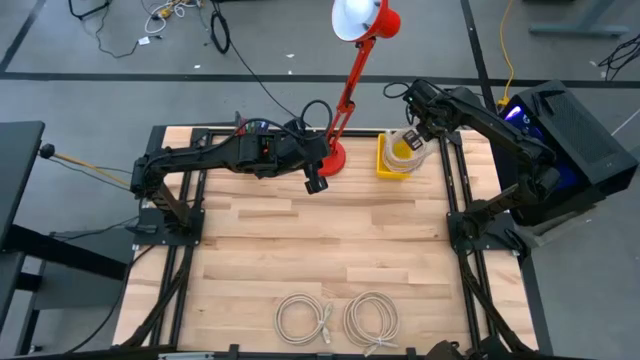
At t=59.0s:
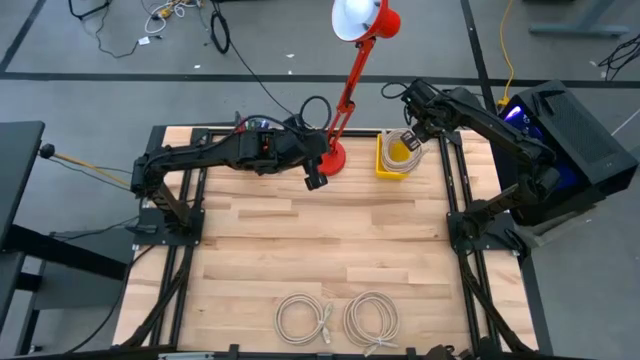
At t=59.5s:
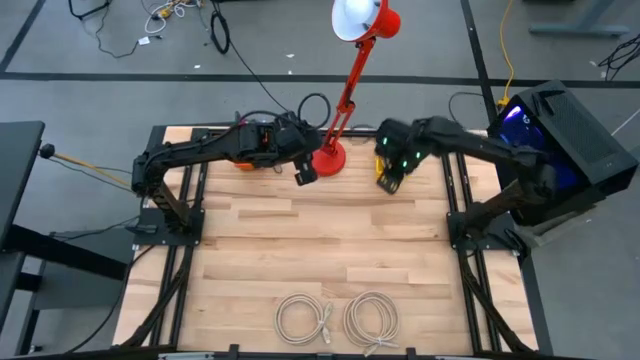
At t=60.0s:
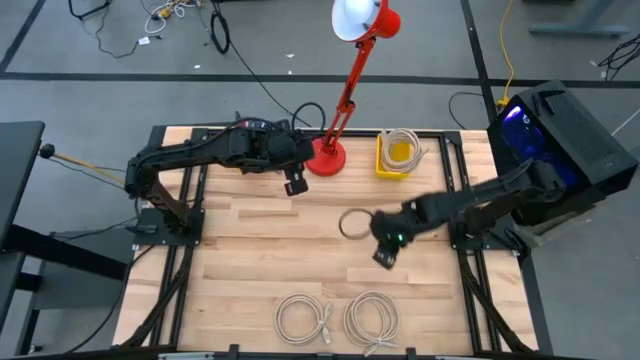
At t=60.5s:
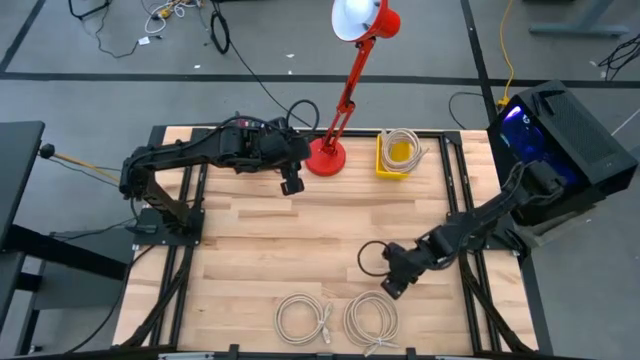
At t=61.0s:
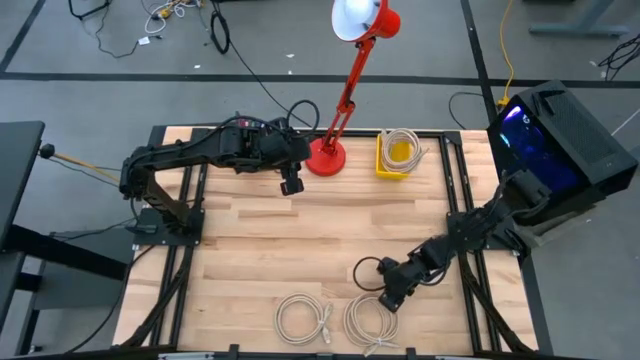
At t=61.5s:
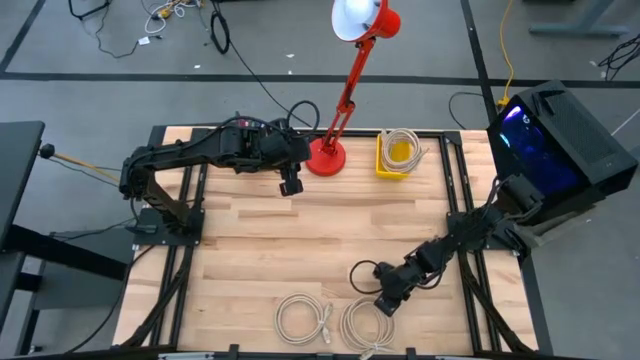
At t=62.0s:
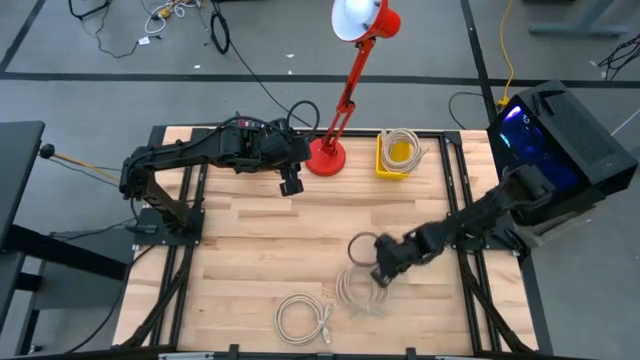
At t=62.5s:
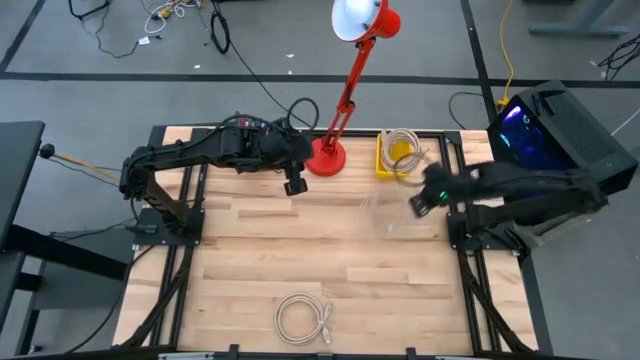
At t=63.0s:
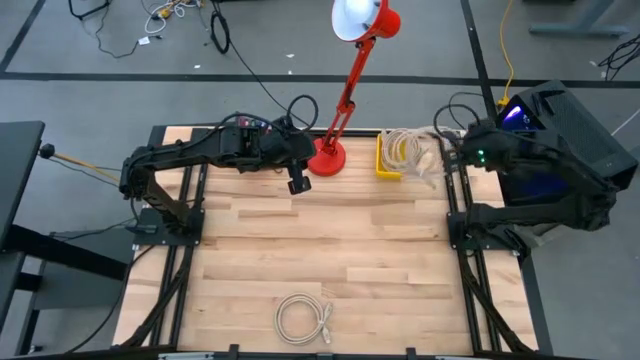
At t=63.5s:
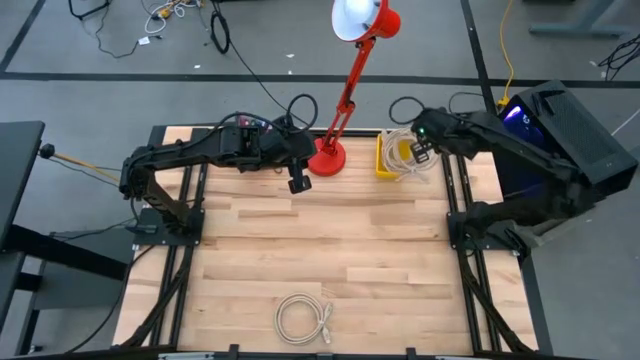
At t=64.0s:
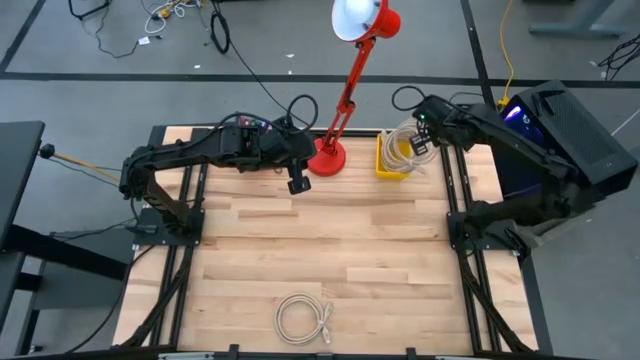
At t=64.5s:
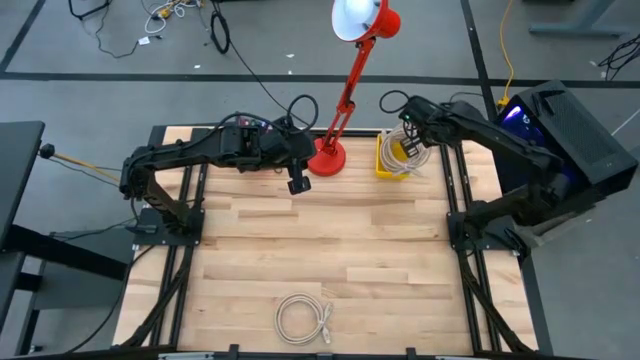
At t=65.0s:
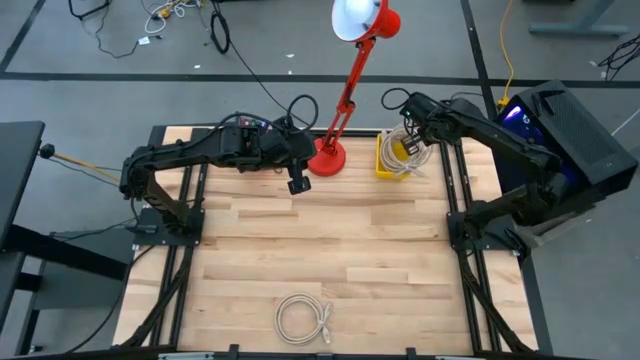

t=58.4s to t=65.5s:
Task: Pick & Place USB Port
Put the white HDMI cable into the yellow bin

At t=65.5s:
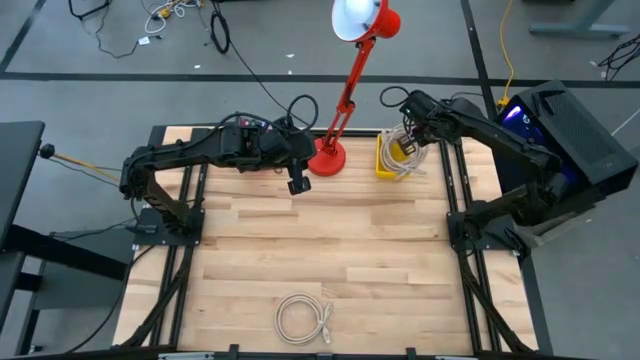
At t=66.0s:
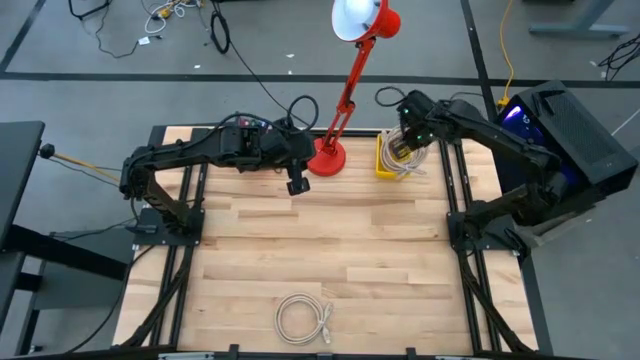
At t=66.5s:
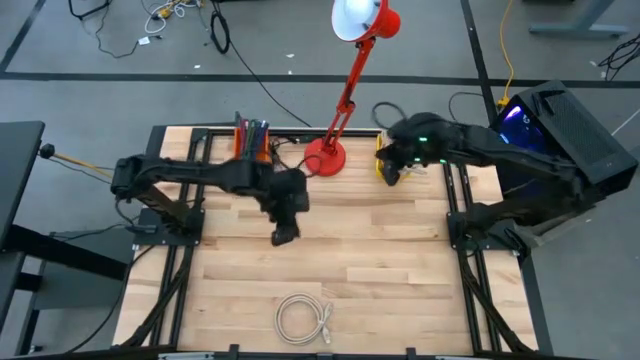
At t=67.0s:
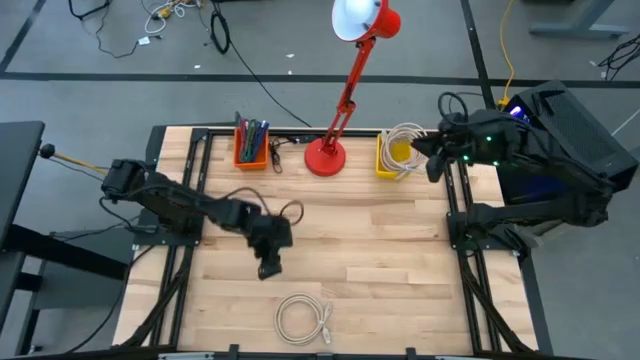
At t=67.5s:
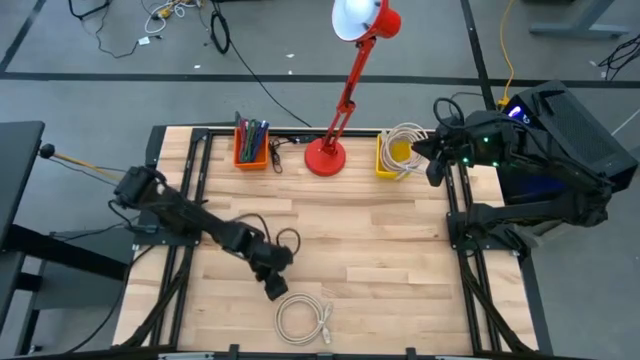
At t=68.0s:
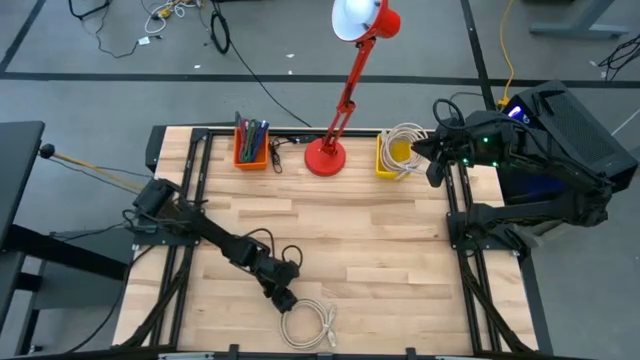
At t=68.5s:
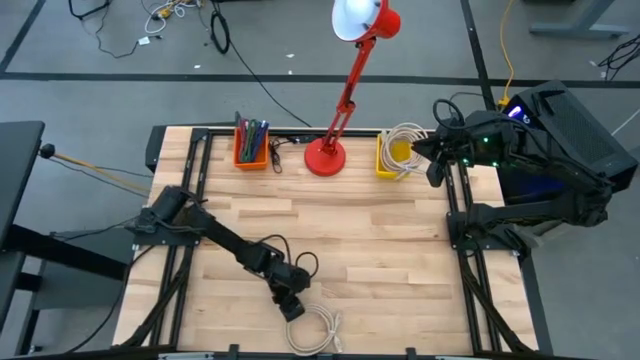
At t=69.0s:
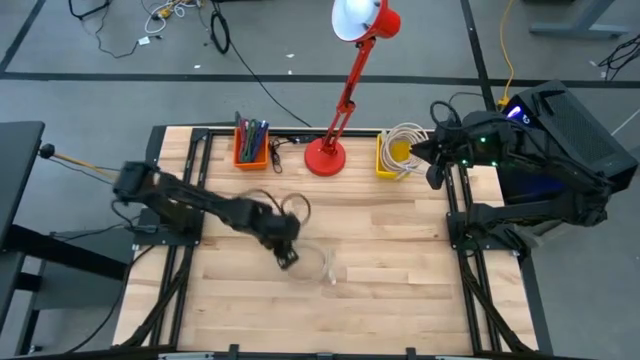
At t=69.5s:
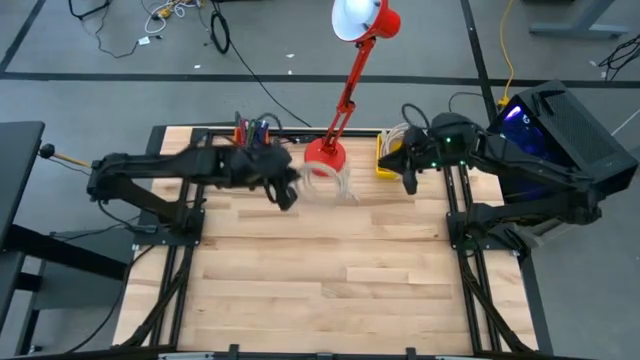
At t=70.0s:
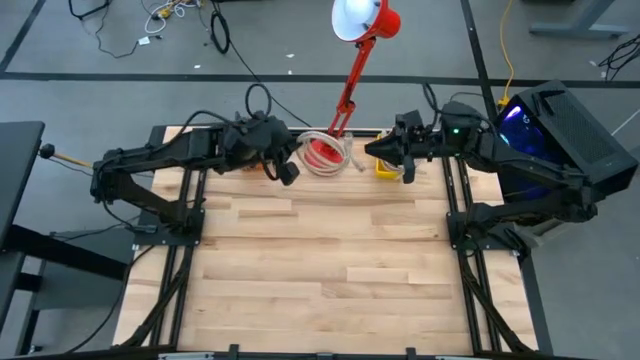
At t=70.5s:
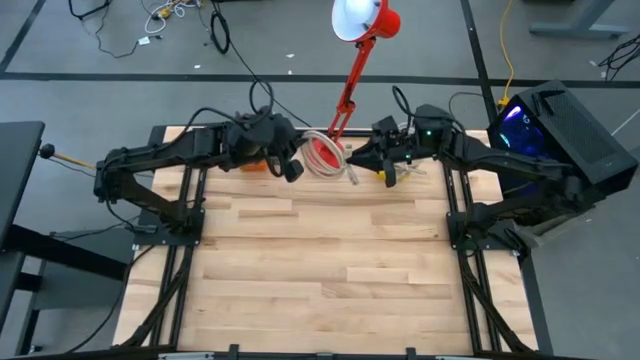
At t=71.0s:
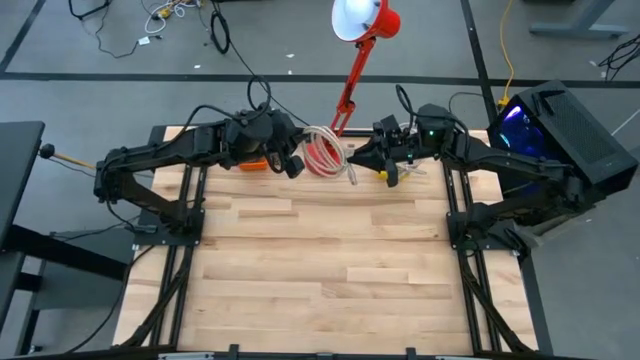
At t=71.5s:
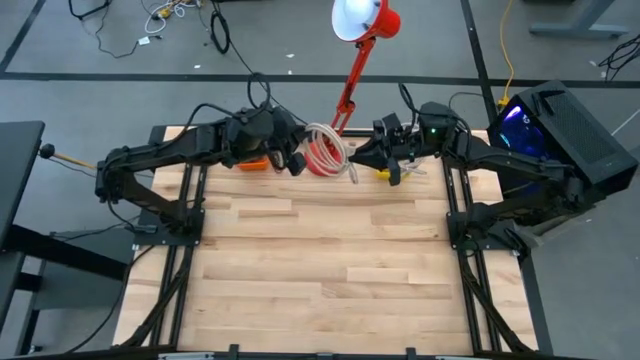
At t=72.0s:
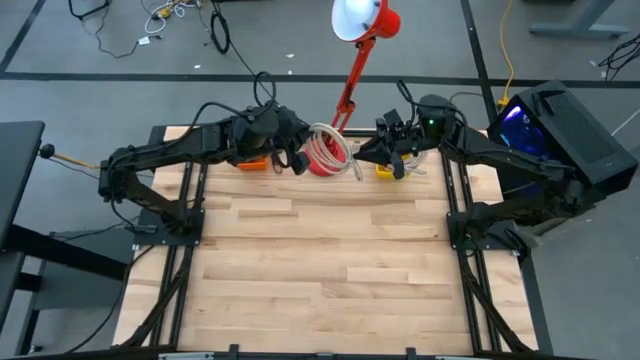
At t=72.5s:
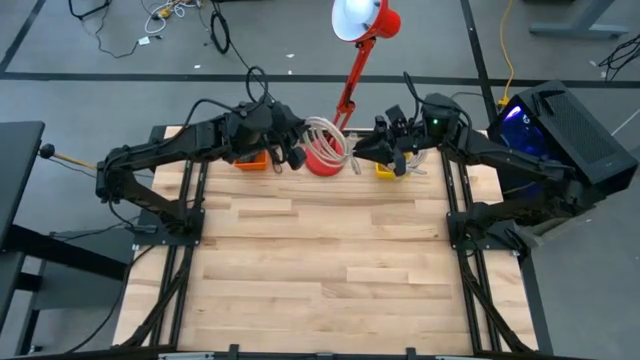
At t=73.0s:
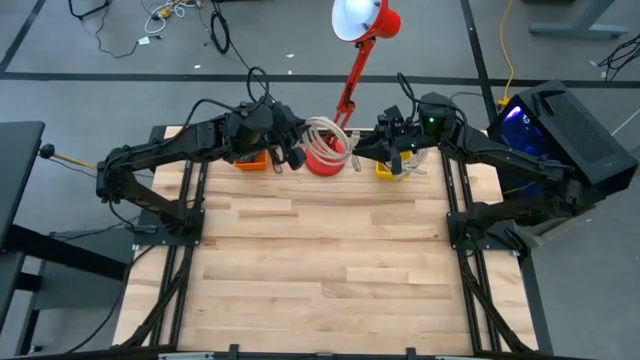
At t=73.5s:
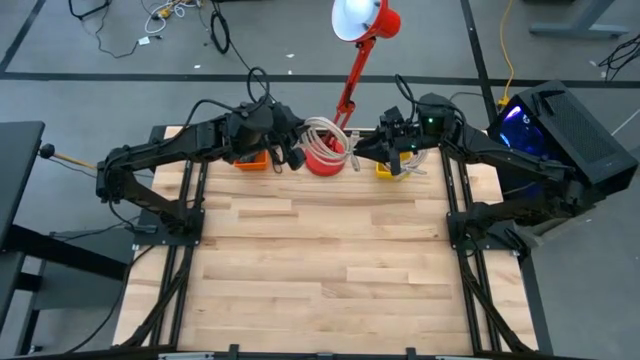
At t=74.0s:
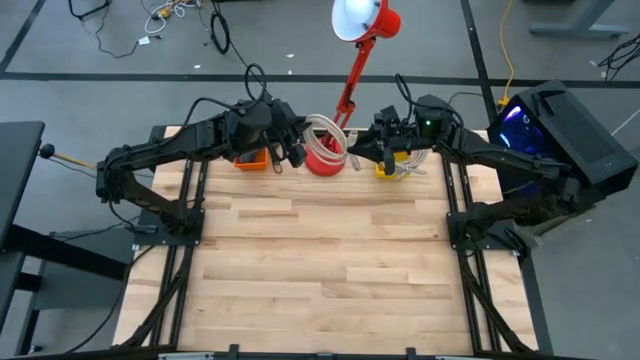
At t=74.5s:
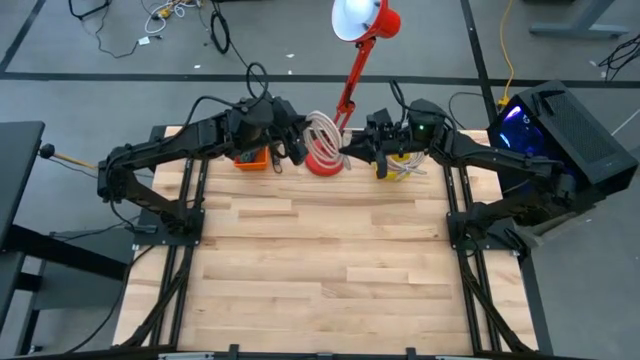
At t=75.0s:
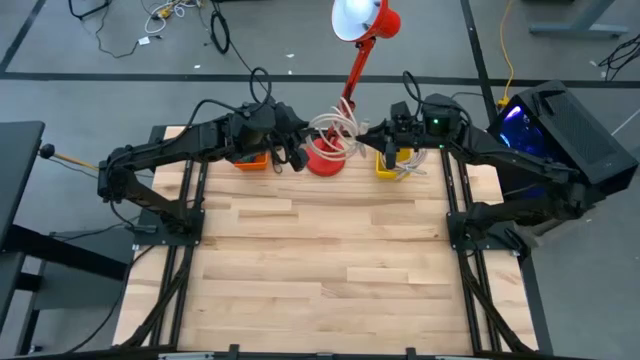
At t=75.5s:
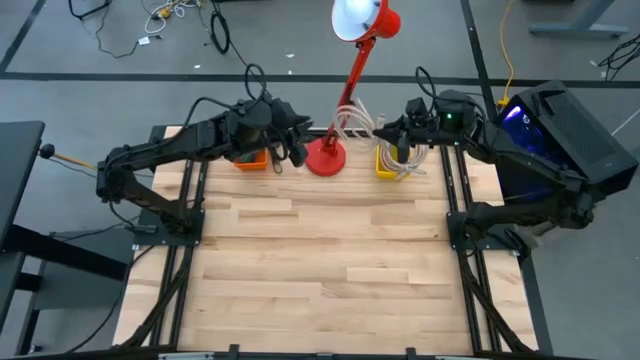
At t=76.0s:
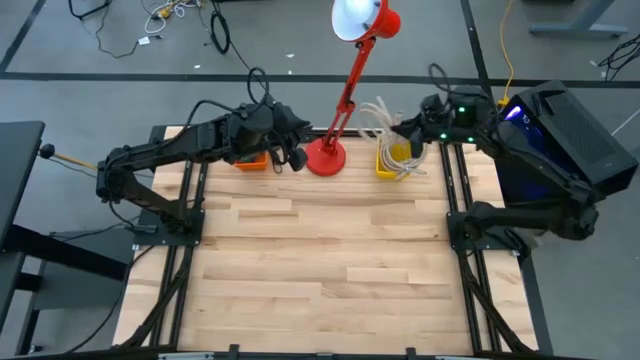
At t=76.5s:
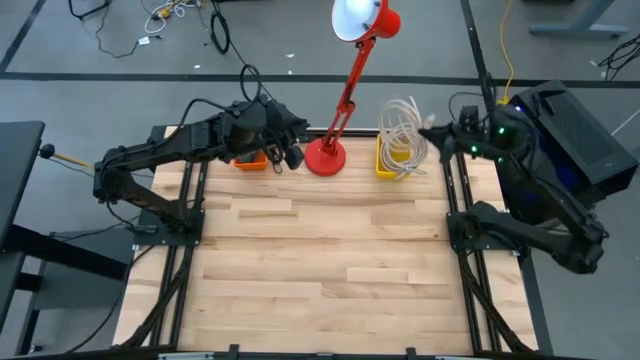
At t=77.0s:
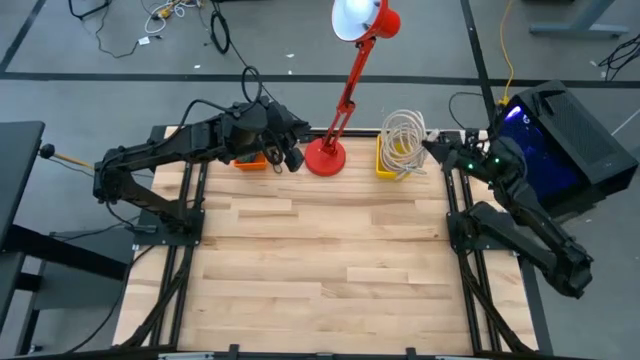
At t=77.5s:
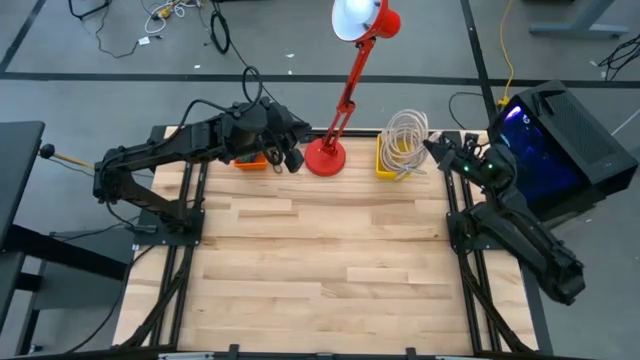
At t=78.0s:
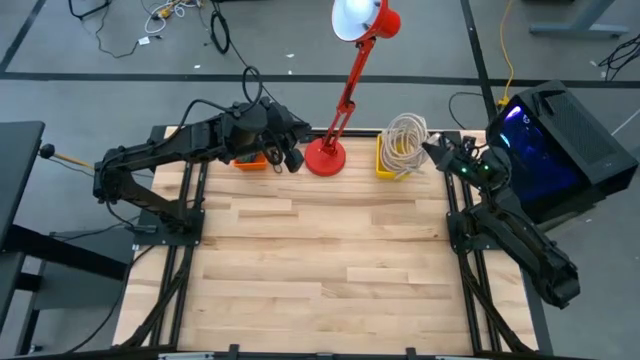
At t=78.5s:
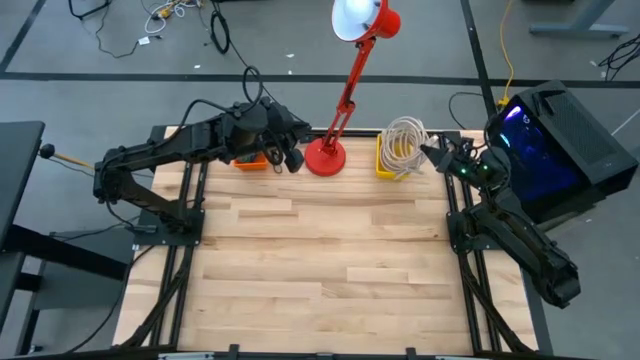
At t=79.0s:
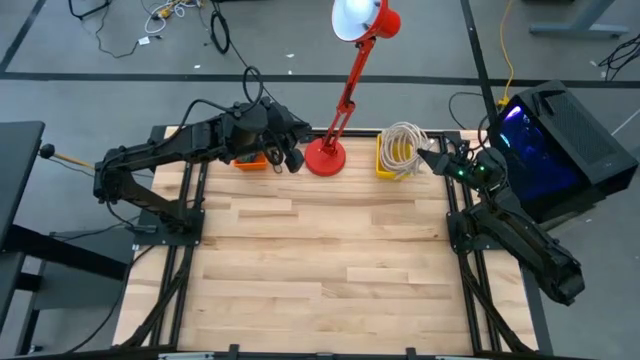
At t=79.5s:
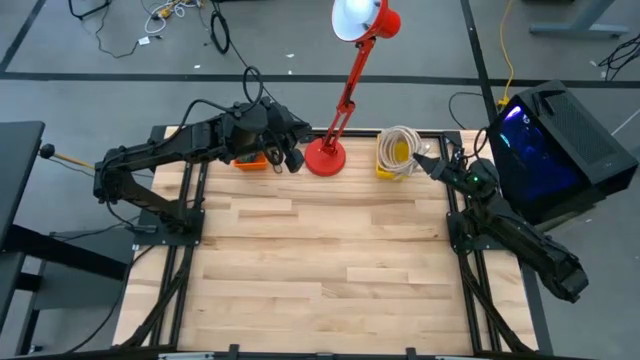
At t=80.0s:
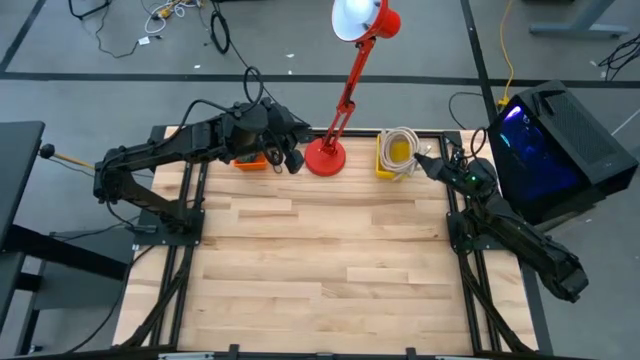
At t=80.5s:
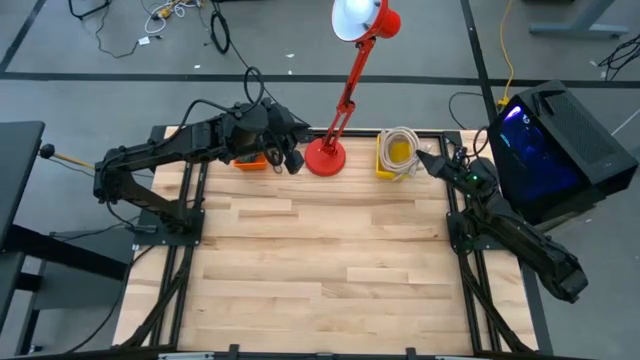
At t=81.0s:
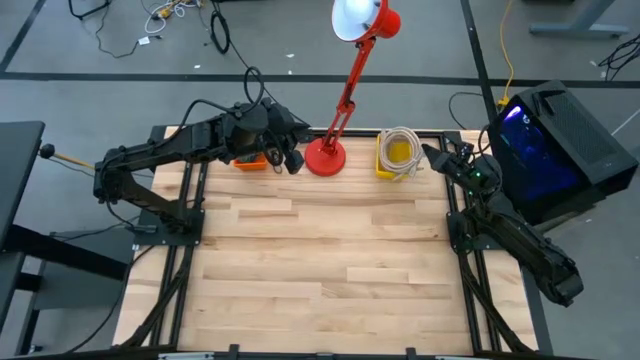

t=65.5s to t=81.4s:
Put the white HDMI cable into the yellow bin
